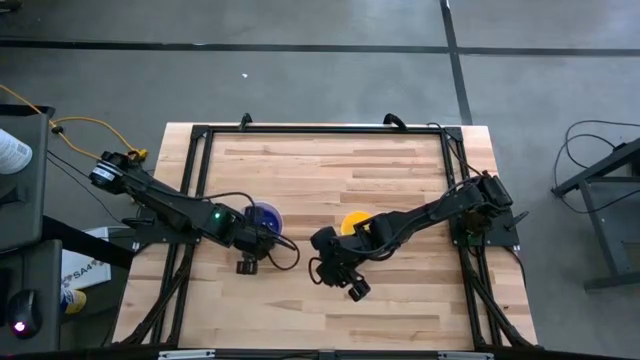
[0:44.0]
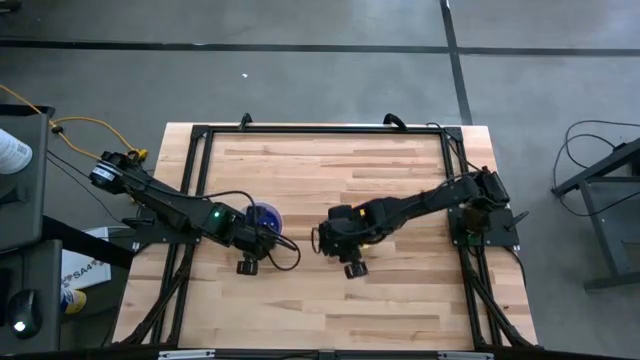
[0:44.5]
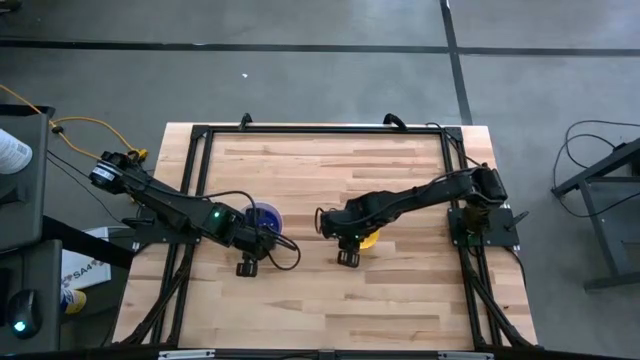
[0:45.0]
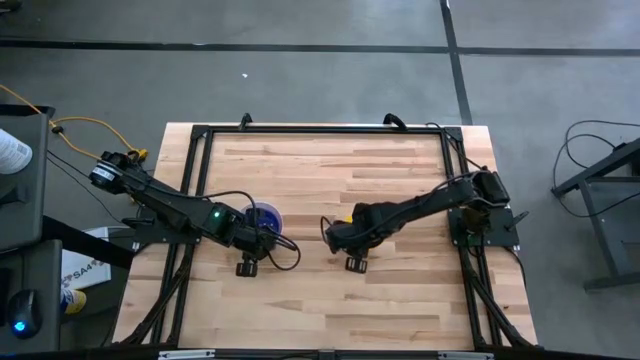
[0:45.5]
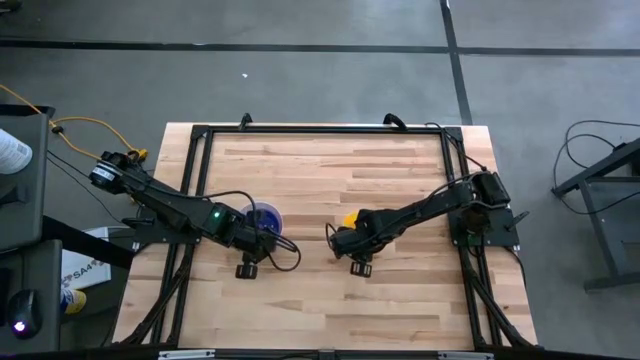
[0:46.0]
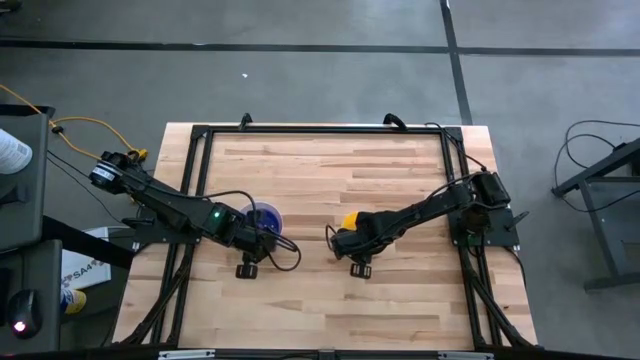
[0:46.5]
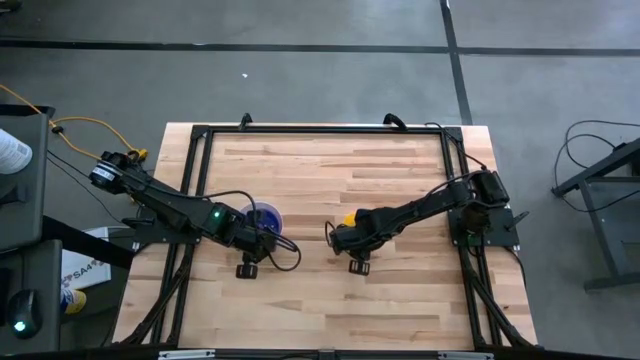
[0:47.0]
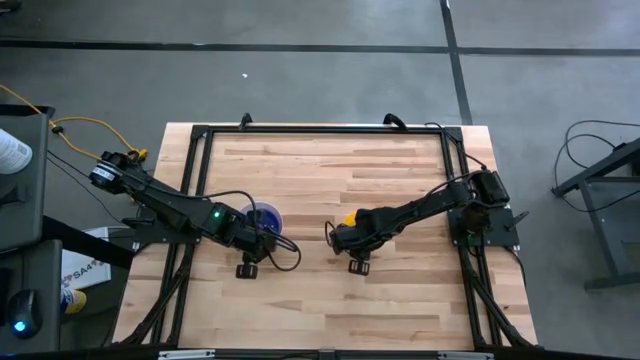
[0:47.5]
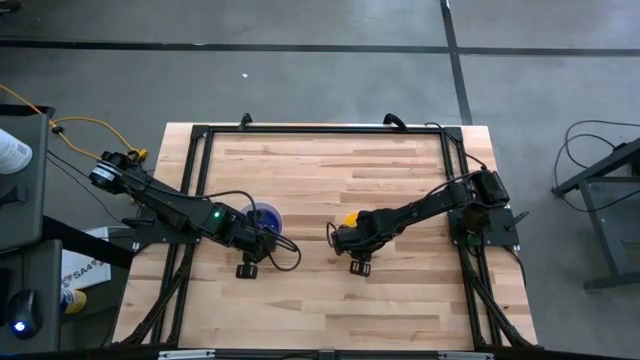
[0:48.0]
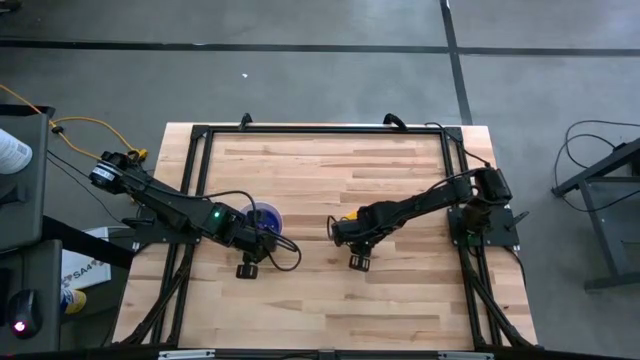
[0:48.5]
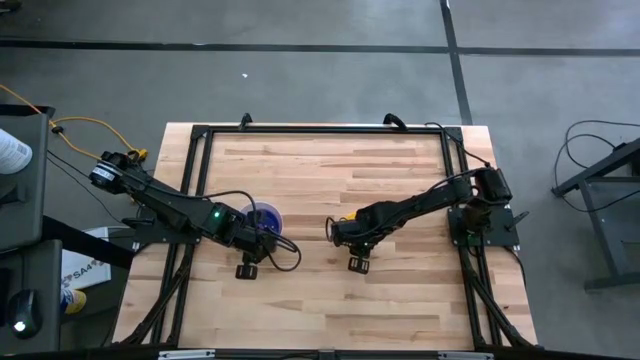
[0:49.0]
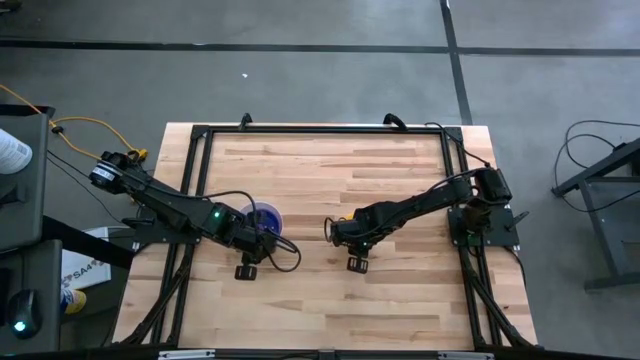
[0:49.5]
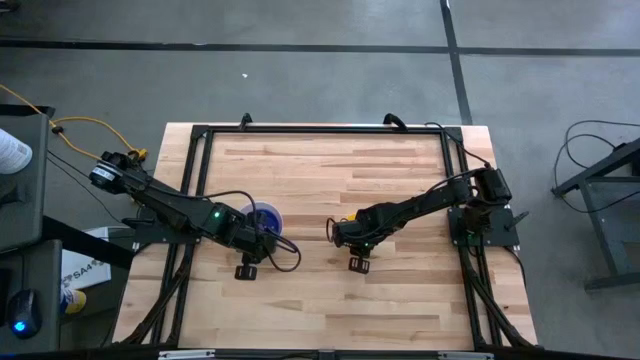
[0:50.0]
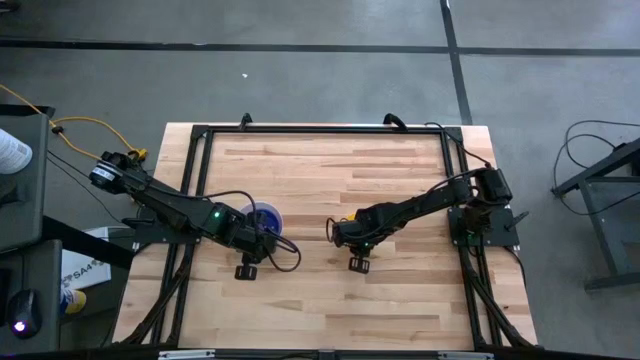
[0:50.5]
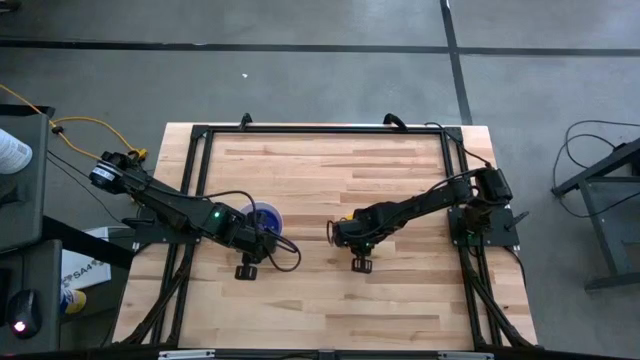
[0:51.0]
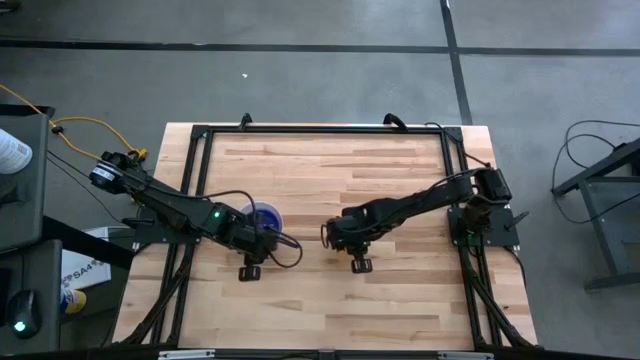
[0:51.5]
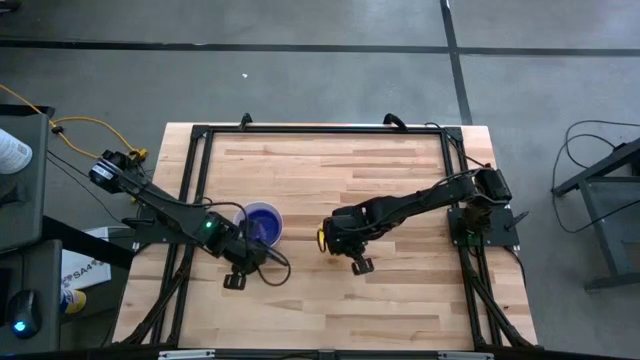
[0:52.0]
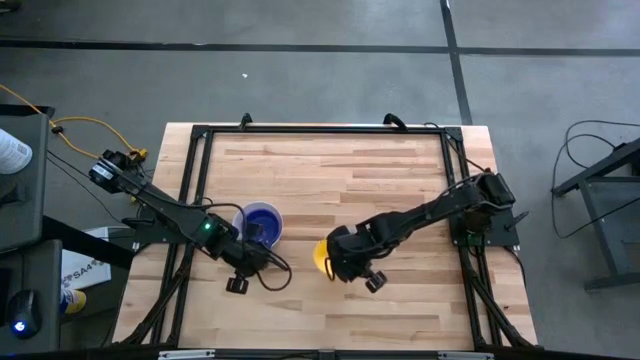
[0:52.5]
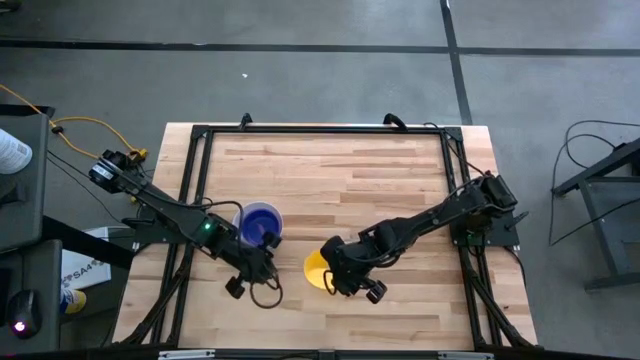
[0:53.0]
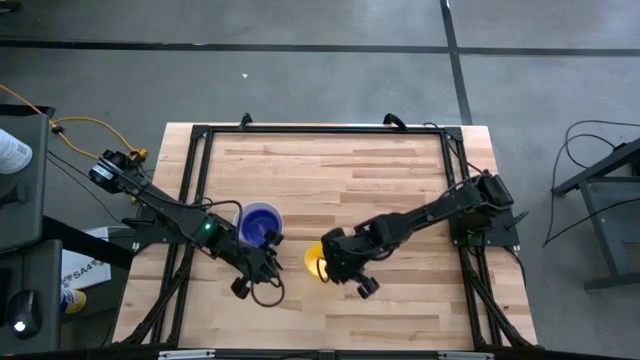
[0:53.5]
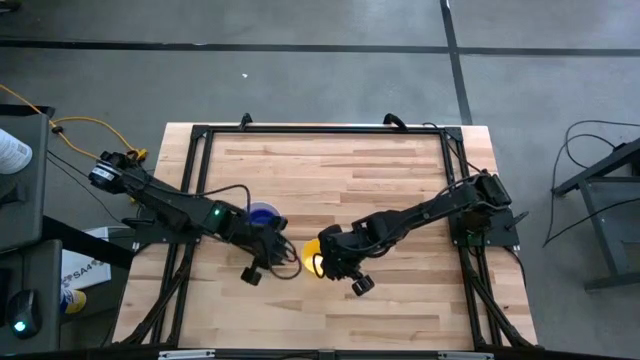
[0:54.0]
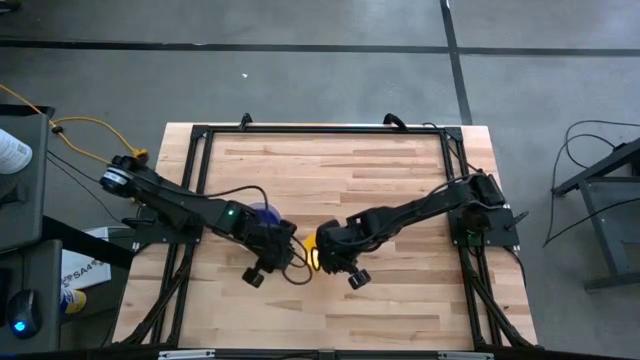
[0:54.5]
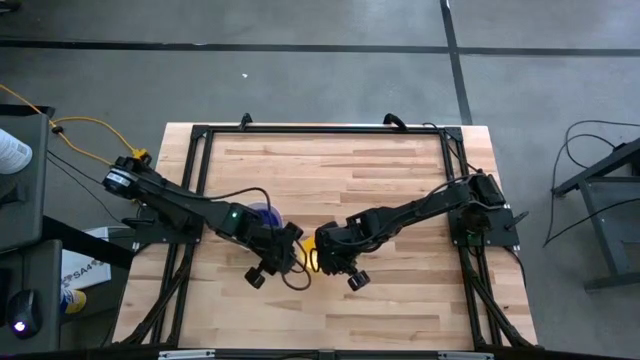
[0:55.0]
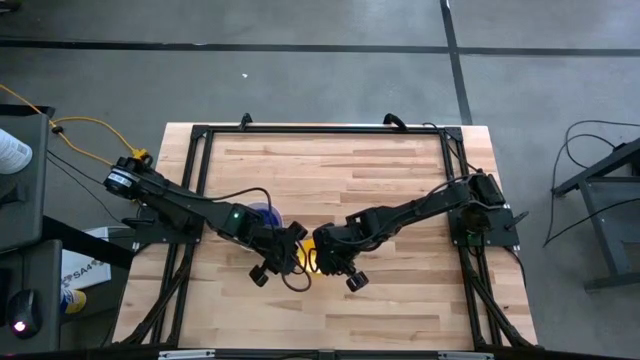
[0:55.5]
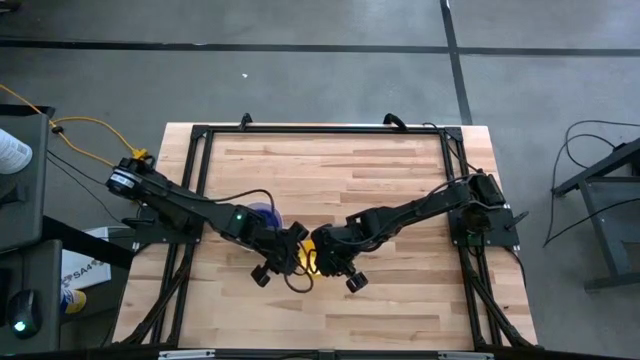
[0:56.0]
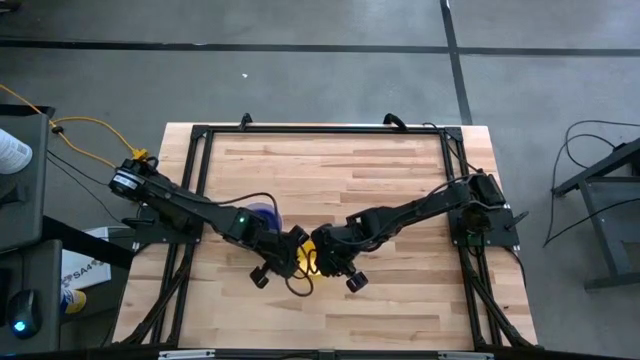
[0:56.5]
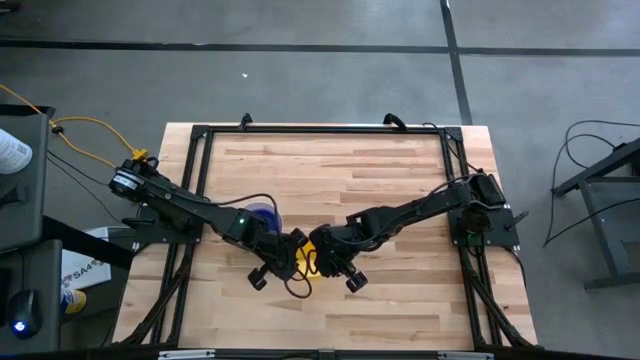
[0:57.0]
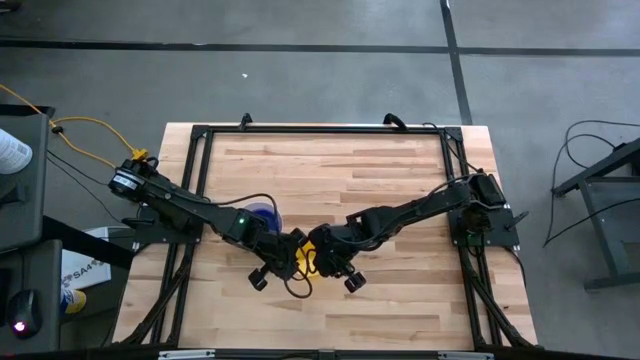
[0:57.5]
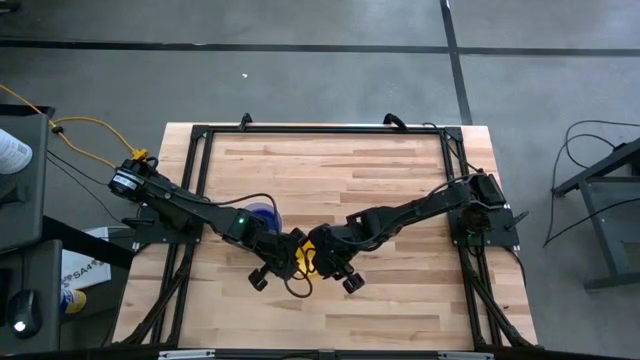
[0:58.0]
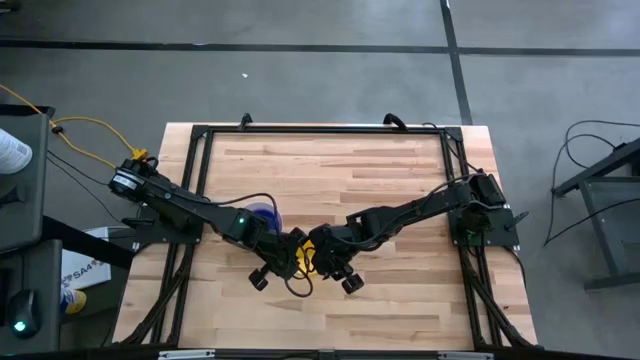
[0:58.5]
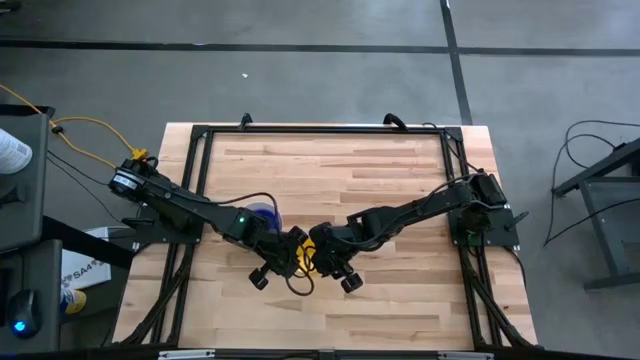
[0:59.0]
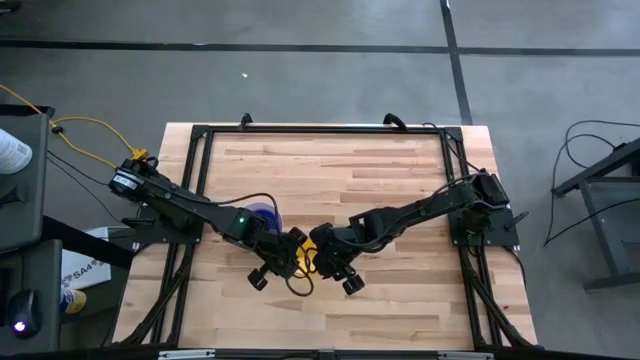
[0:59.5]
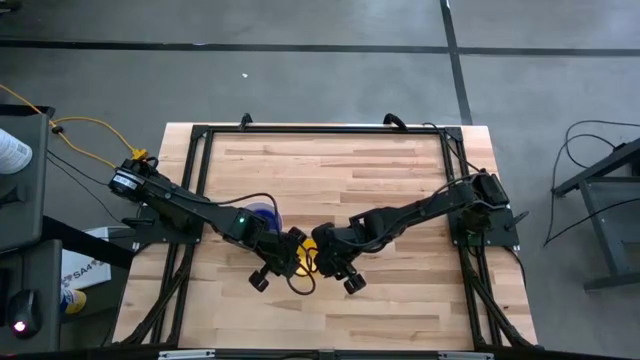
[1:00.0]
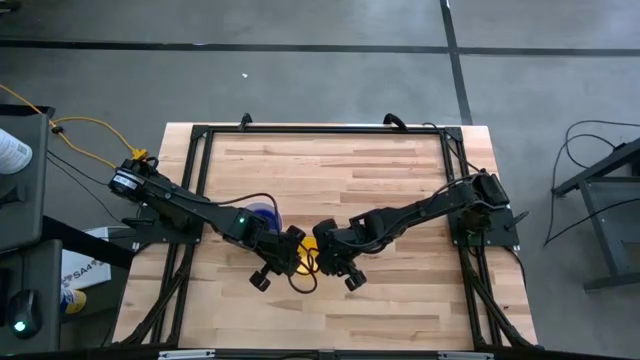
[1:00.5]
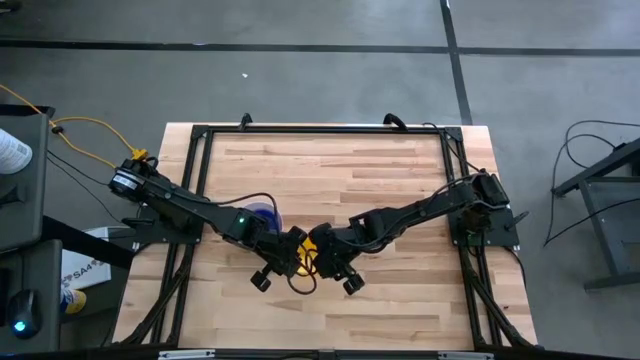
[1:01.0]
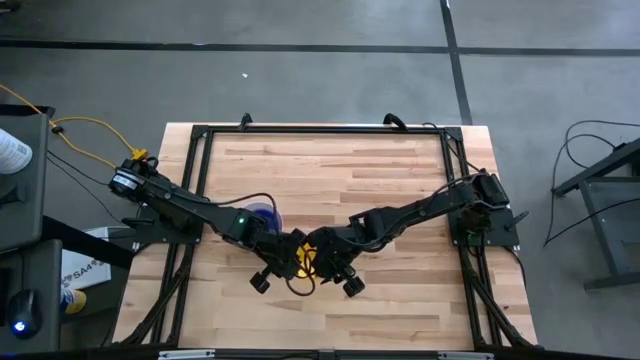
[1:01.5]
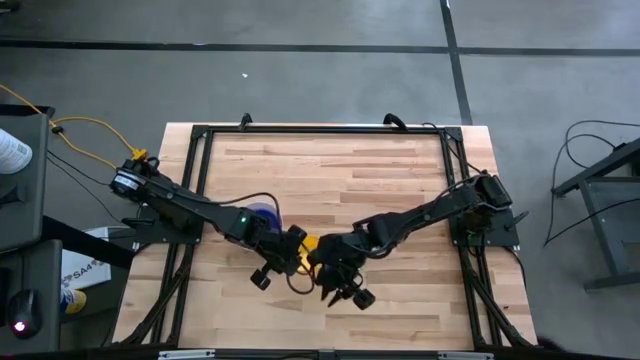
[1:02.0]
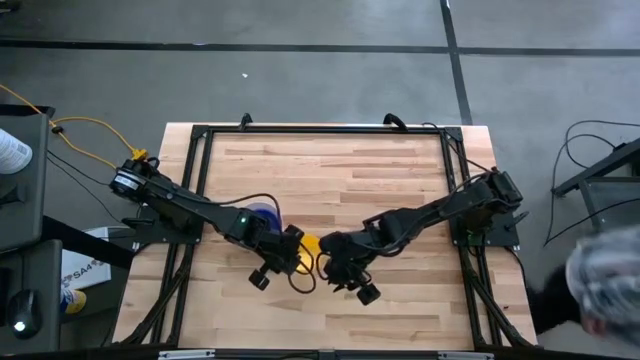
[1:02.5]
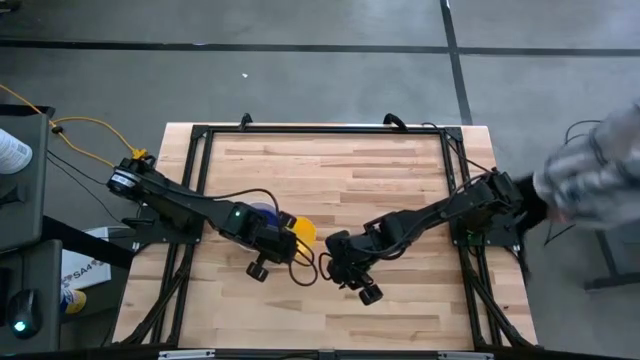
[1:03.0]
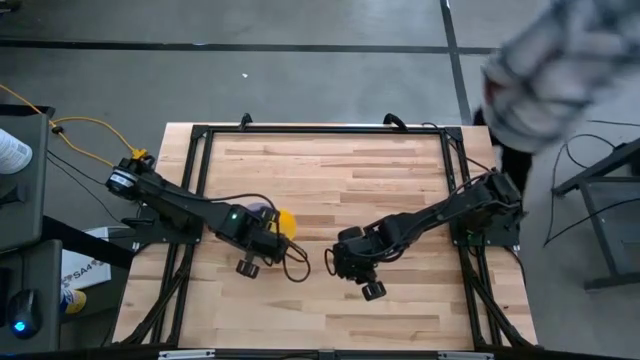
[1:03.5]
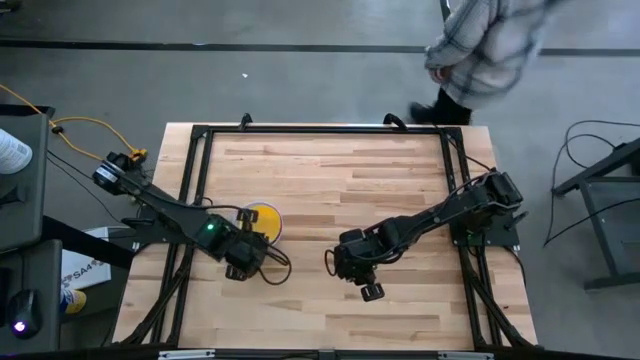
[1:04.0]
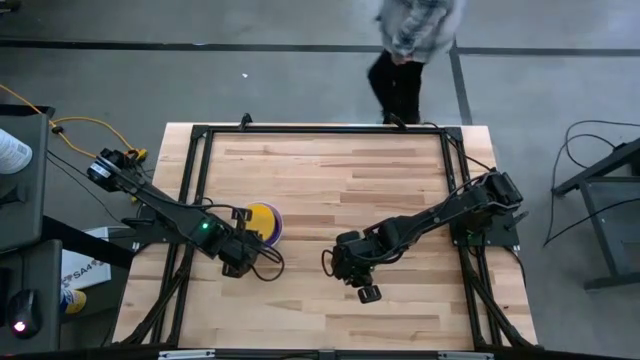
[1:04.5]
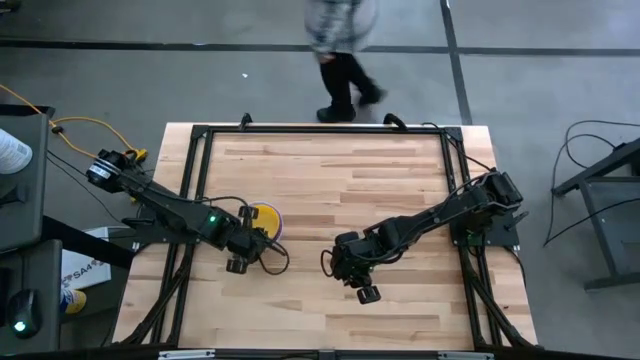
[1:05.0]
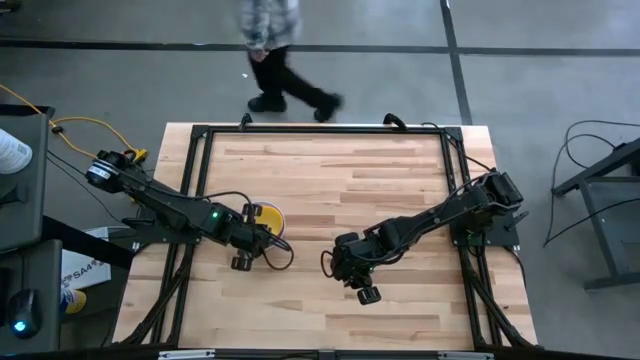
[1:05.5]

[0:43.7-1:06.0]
Stack the yellow bowl on the violet bowl
